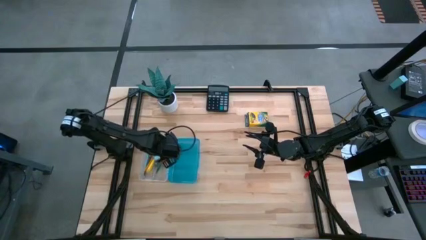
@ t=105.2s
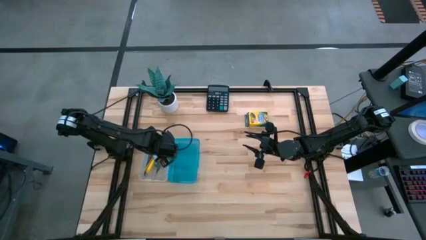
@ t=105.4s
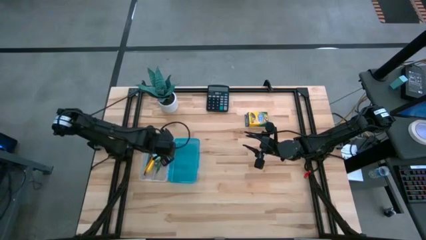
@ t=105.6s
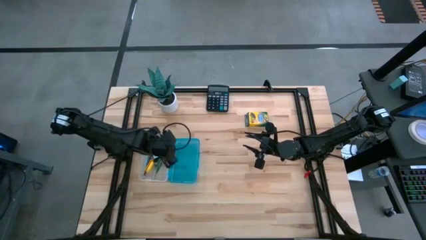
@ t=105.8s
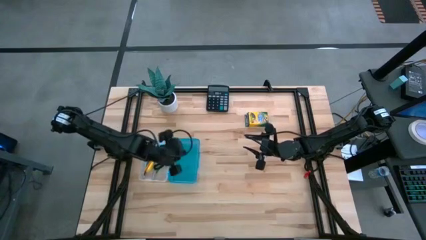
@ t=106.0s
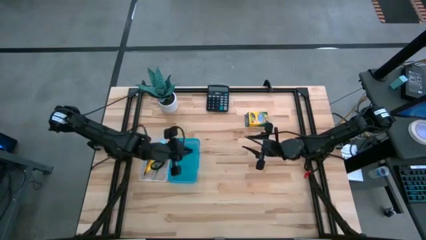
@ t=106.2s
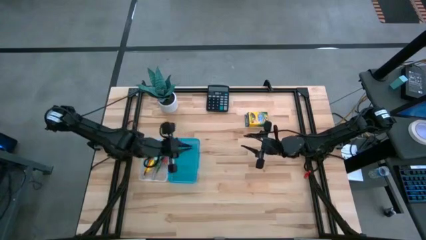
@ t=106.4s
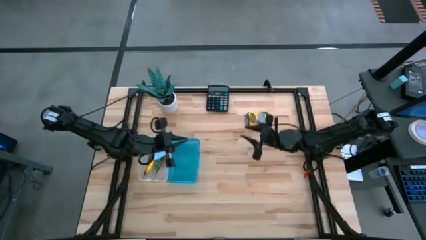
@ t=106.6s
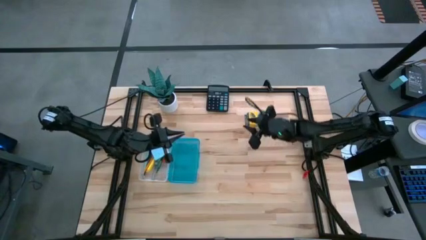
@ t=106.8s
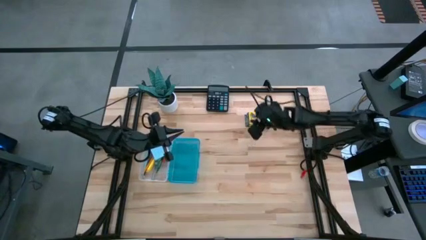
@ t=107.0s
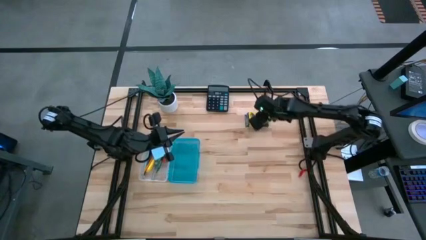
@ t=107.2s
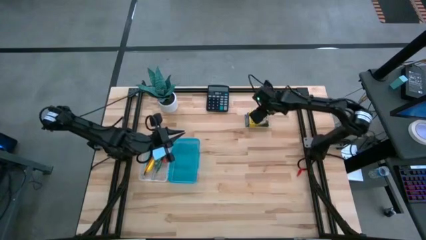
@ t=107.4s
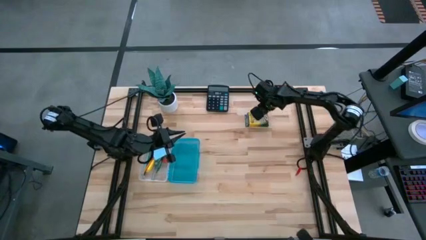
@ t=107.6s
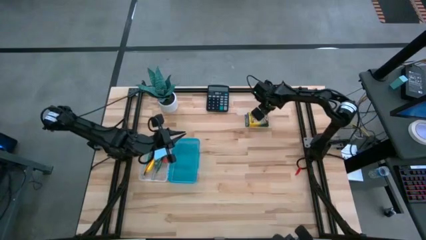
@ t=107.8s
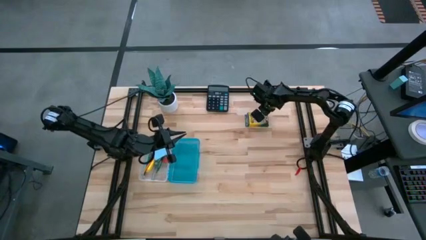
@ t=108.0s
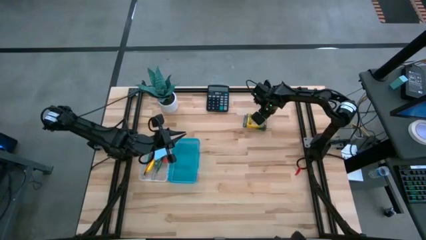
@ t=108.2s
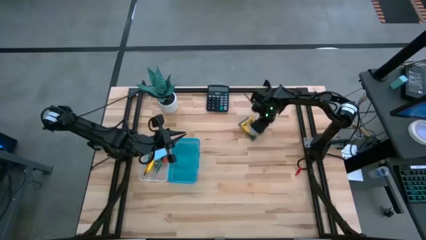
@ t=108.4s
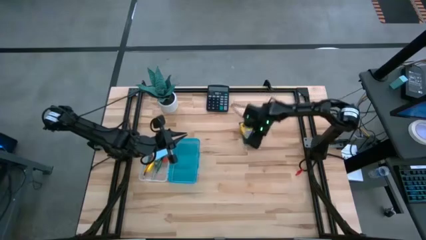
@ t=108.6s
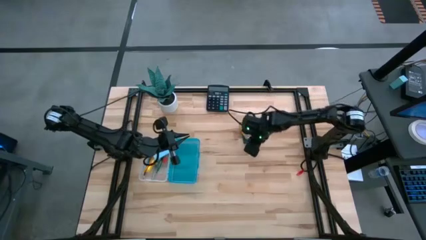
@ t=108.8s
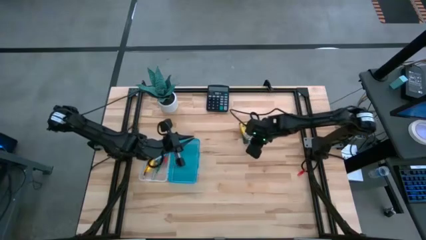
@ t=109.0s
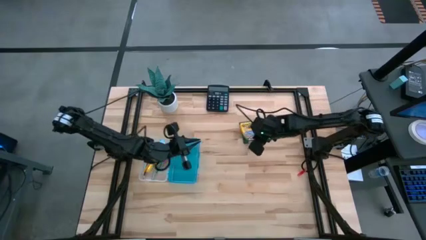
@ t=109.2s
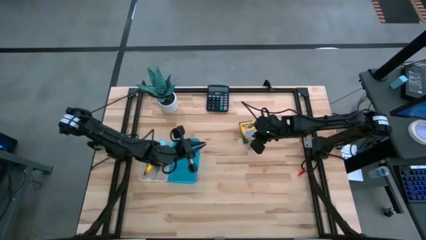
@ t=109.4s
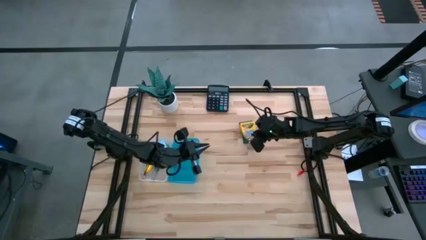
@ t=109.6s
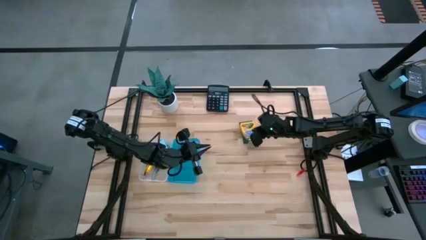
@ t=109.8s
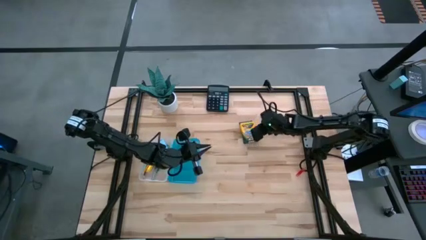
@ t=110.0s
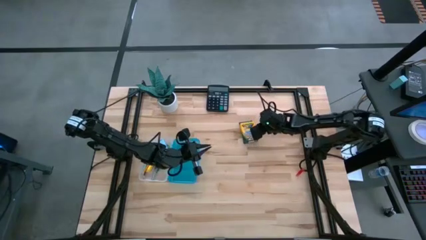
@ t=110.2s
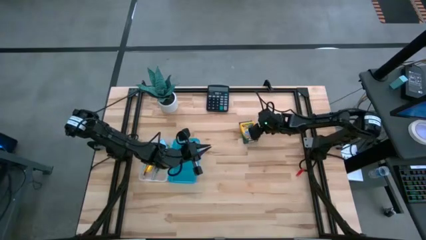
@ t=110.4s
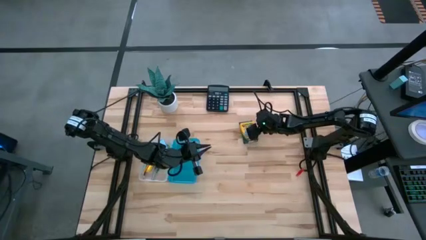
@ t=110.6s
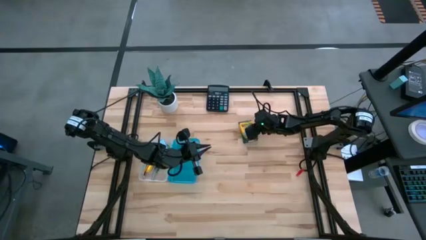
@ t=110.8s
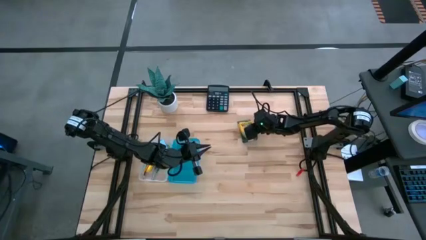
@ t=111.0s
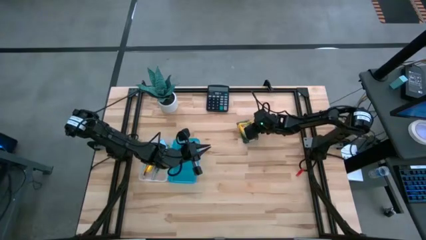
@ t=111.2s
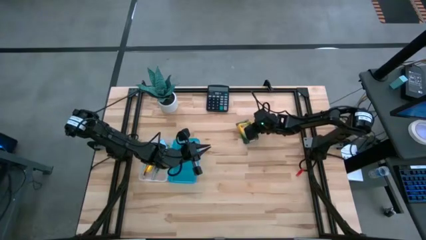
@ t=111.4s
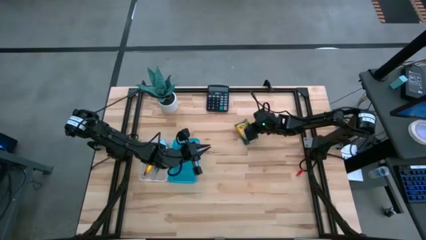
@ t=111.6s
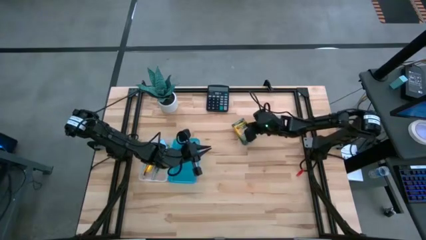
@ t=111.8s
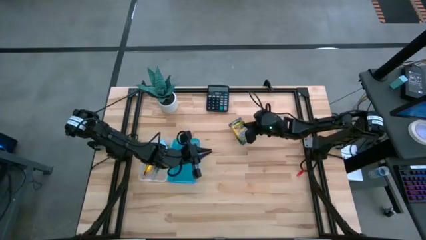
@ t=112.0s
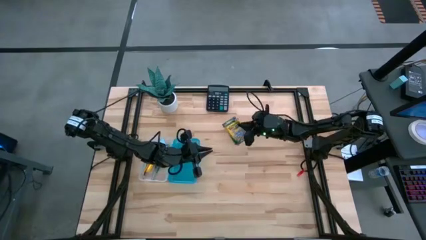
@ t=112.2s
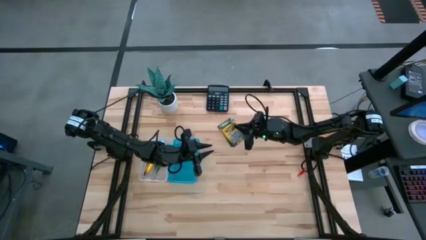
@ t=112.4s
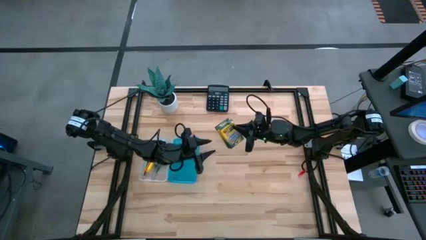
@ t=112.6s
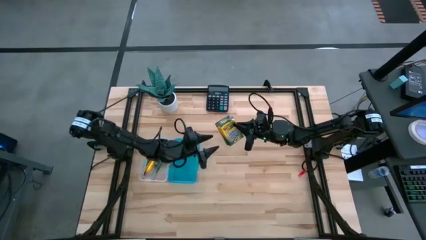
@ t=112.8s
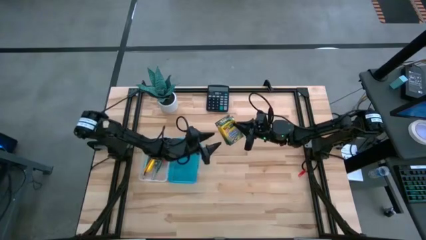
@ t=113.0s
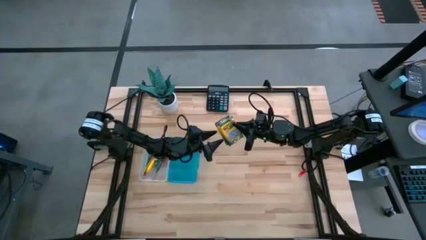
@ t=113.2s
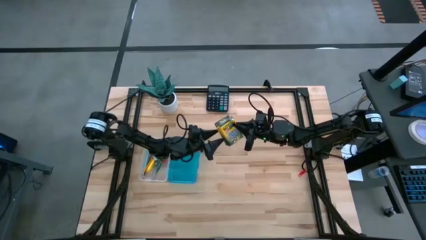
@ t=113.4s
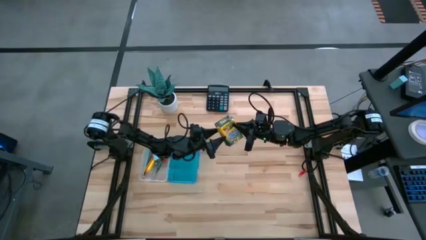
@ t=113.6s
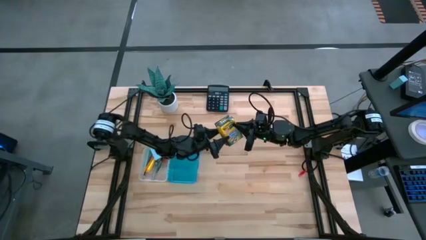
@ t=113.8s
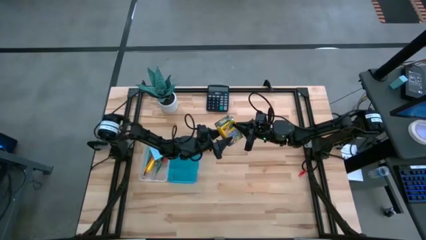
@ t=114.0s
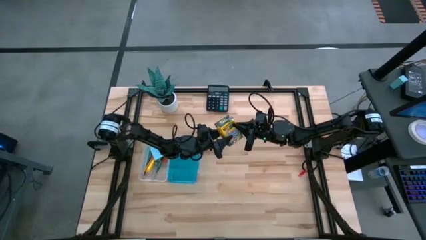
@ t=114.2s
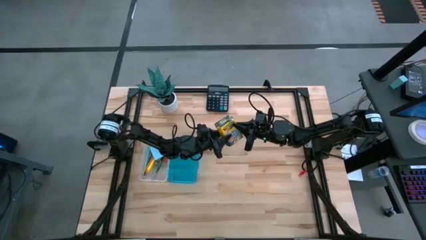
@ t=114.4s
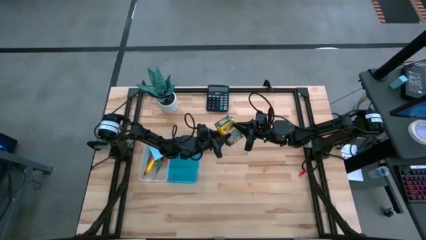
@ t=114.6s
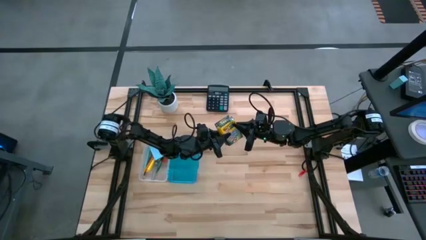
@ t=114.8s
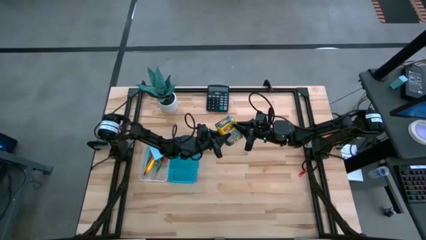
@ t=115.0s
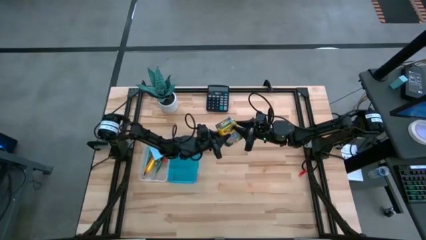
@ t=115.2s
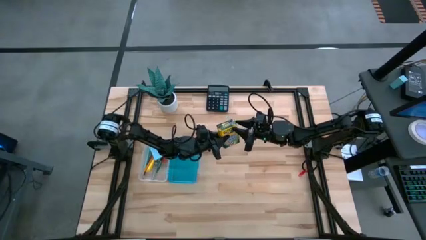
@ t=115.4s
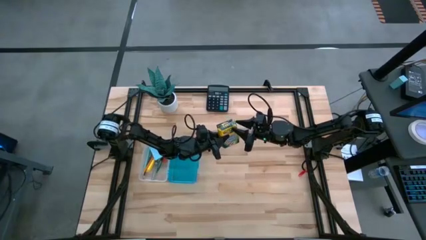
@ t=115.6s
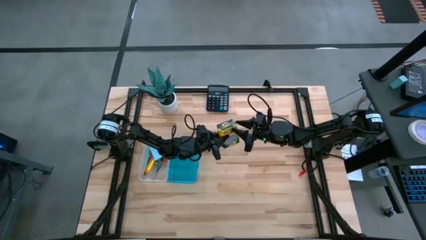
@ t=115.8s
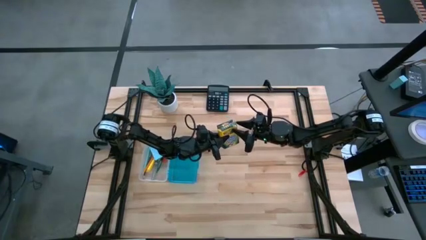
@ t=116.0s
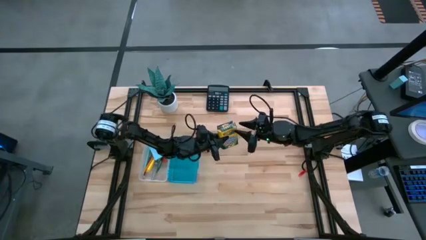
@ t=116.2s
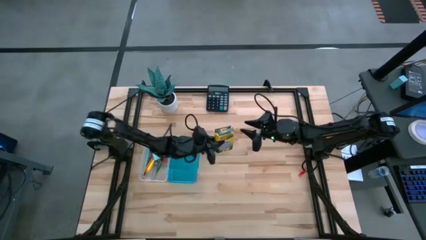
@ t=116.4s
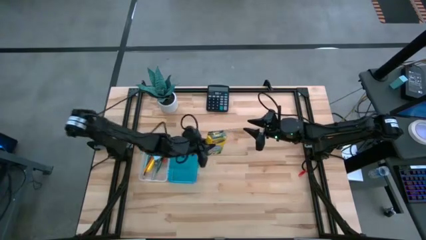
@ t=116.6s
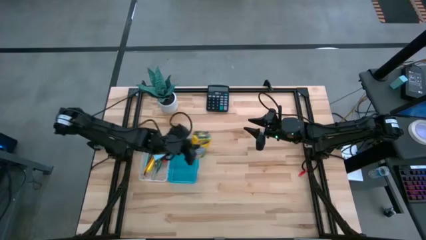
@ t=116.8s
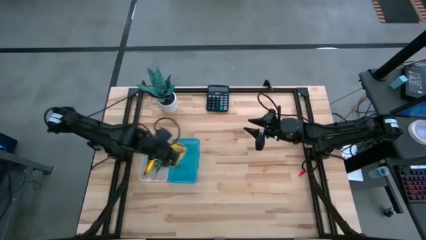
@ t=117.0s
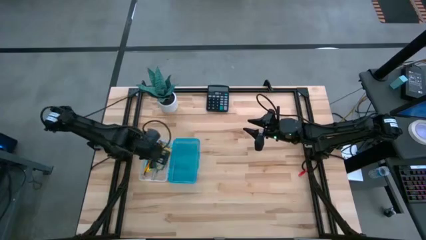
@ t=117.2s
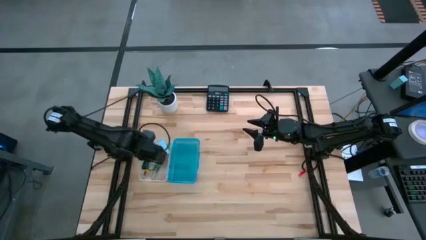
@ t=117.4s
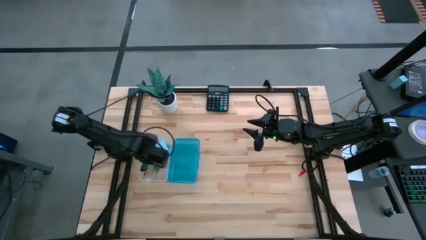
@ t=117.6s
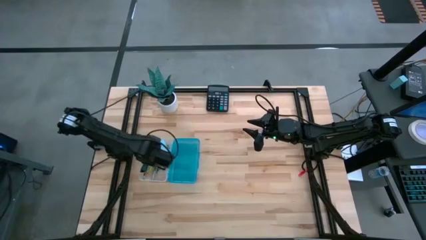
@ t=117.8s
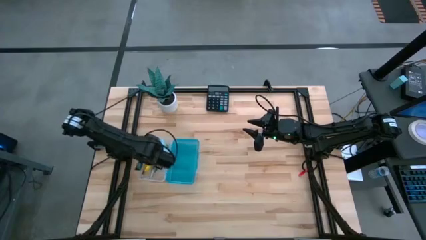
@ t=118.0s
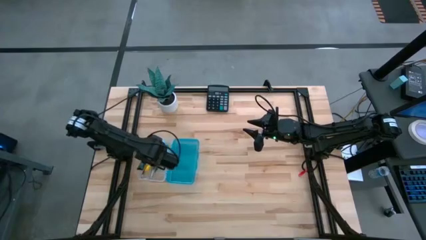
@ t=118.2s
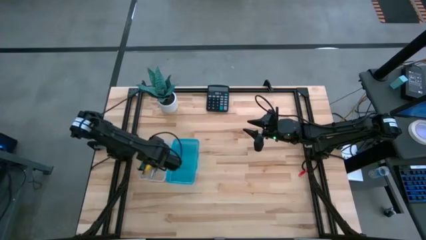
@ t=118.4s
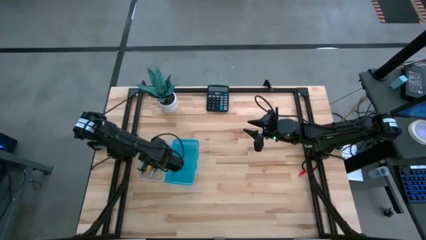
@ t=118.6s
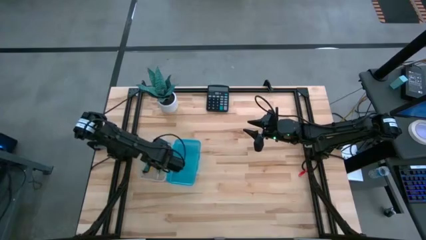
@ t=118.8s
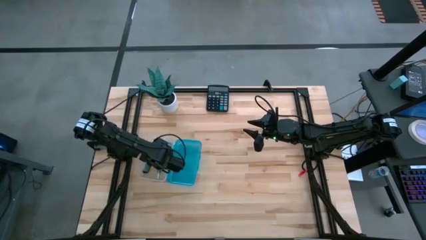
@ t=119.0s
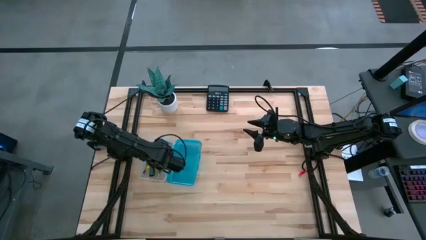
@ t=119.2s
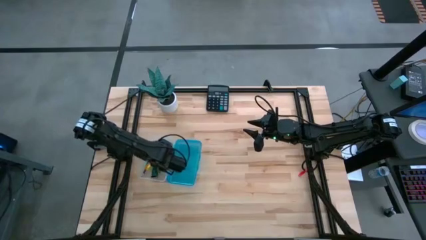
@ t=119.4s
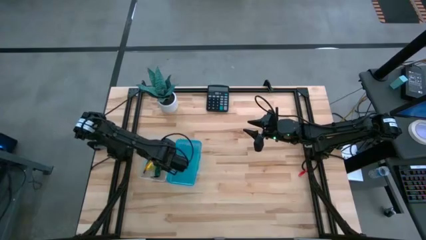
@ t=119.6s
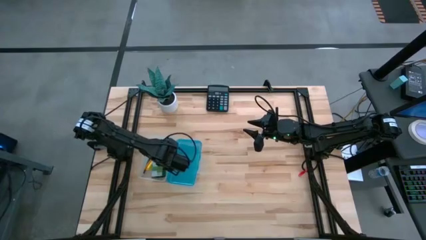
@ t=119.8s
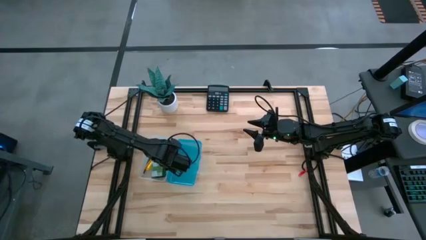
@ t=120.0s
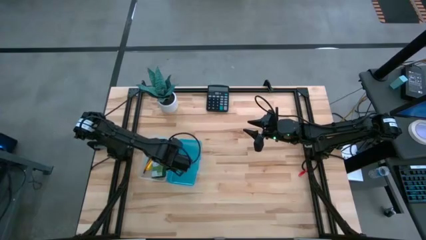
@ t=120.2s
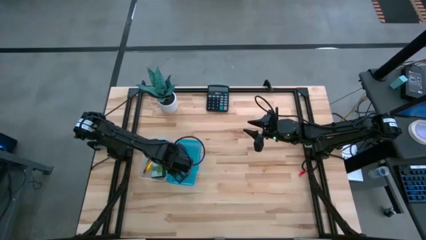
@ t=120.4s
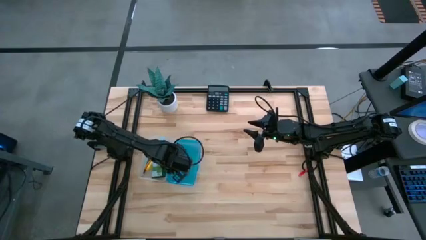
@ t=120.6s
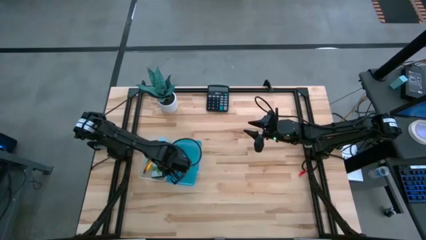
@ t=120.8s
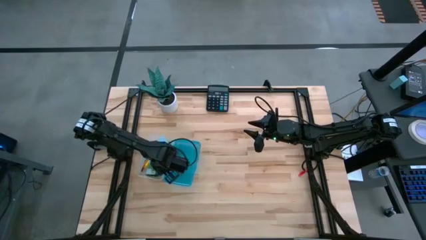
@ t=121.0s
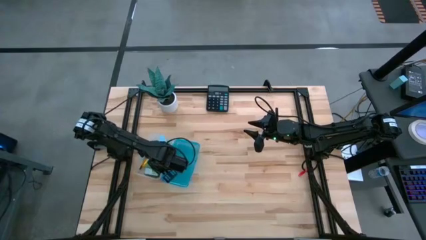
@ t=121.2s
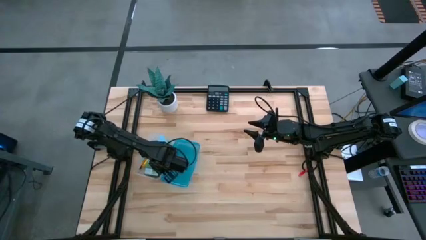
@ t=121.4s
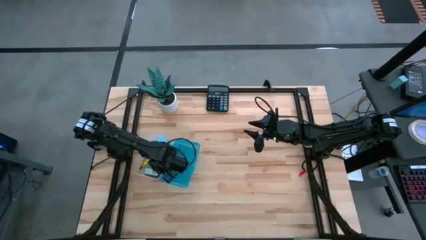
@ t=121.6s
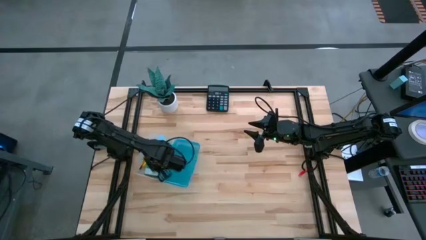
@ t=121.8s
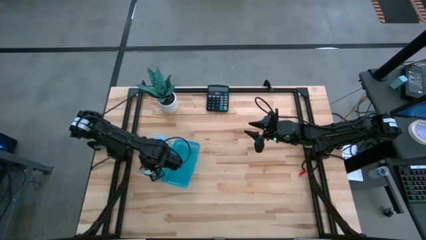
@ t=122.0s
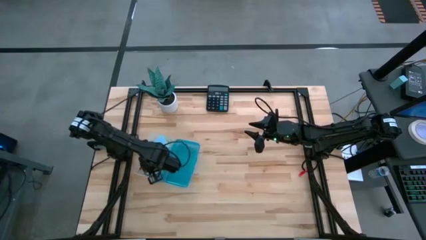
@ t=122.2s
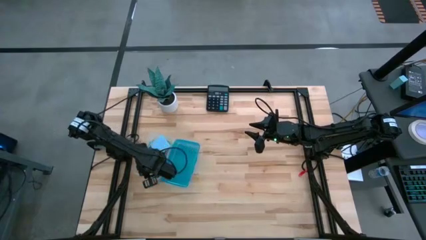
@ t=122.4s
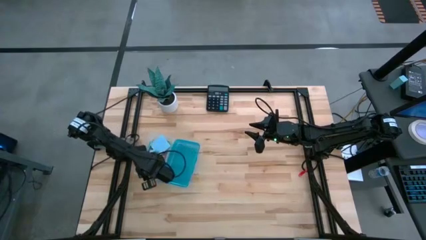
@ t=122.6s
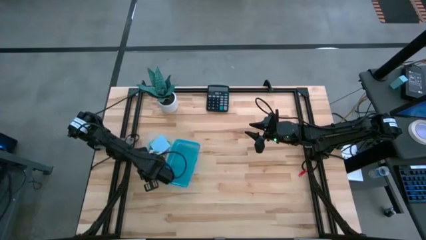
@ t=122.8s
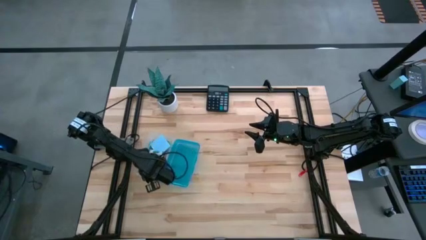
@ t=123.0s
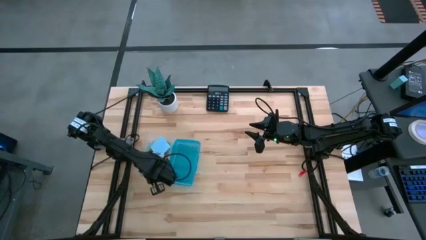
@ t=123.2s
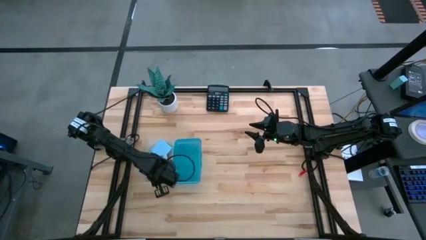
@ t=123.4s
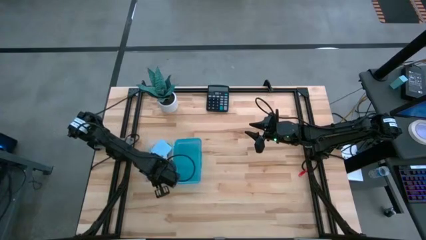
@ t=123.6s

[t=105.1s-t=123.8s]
Task: Pack school essentials
Put the yellow crayon box into the blue supply box
